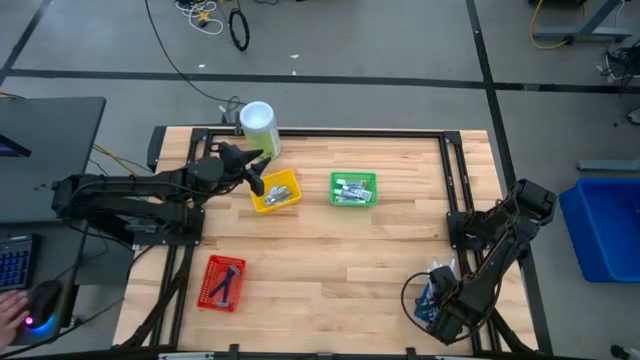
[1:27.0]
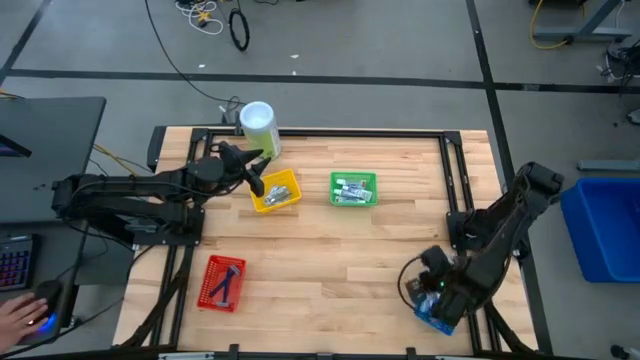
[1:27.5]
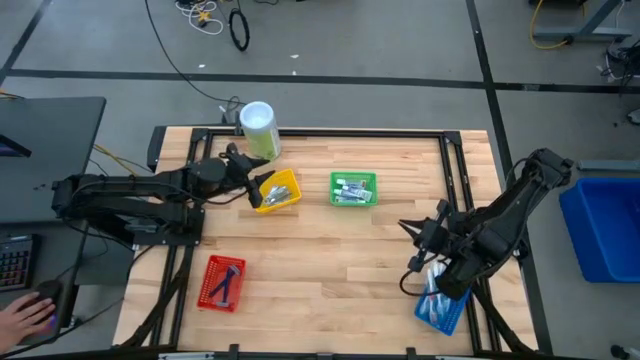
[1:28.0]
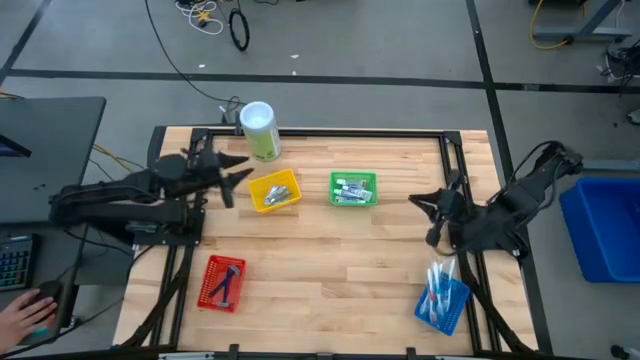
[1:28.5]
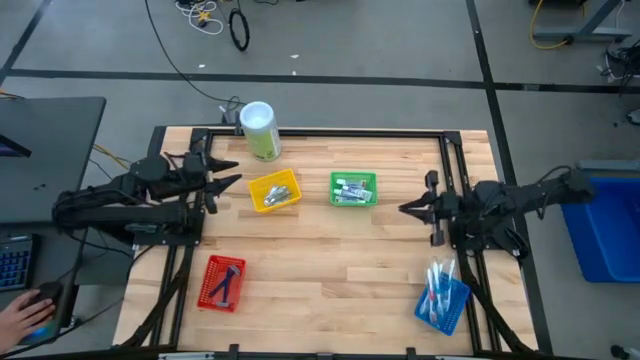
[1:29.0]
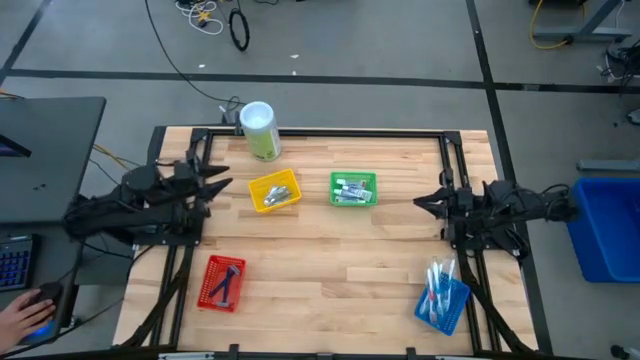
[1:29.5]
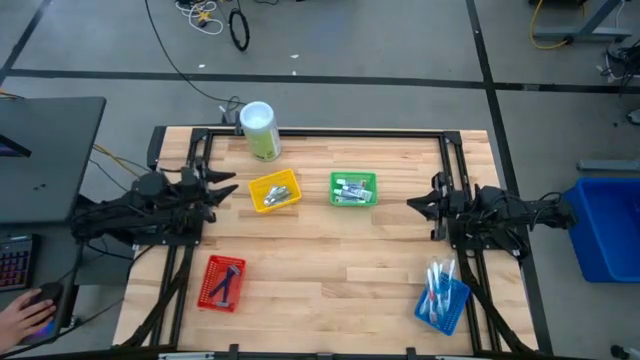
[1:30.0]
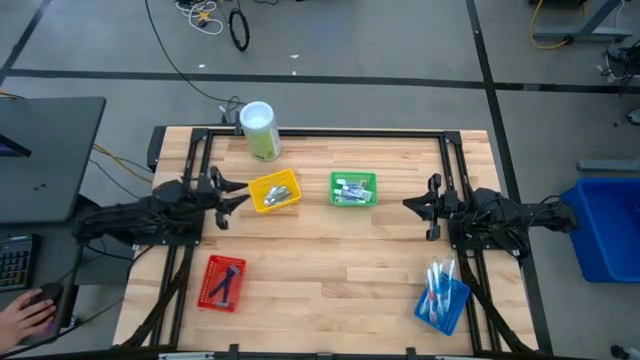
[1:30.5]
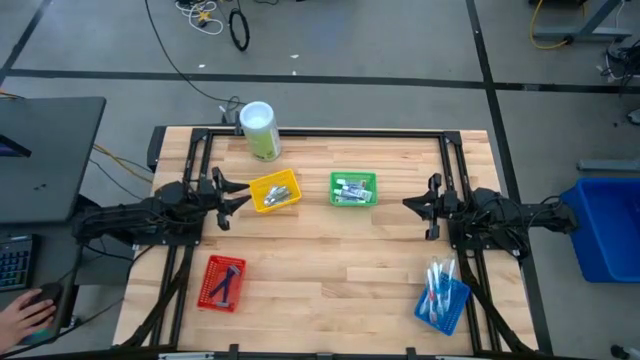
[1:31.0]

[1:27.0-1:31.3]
Task: Pick & Place Travel size toiletries
Return to Home Position

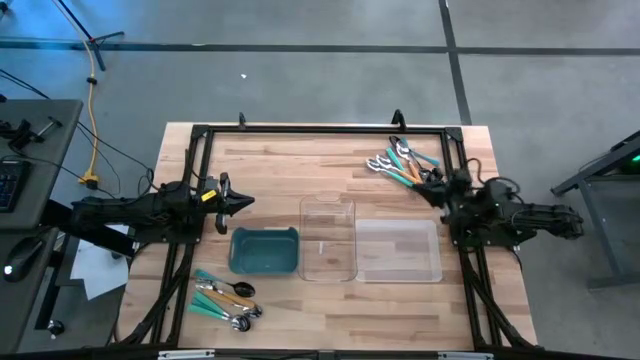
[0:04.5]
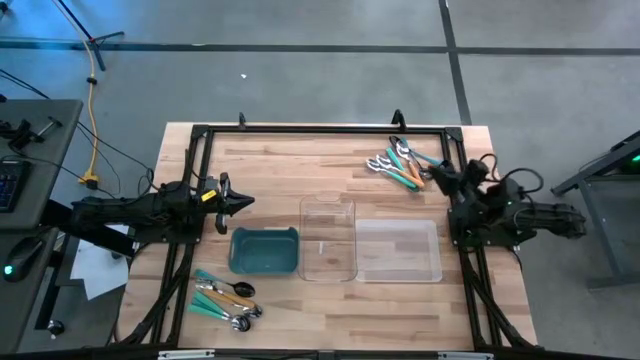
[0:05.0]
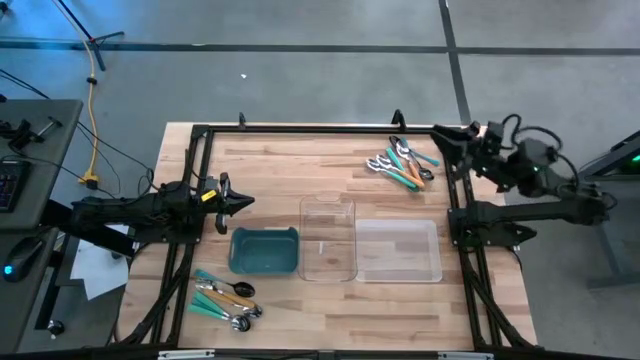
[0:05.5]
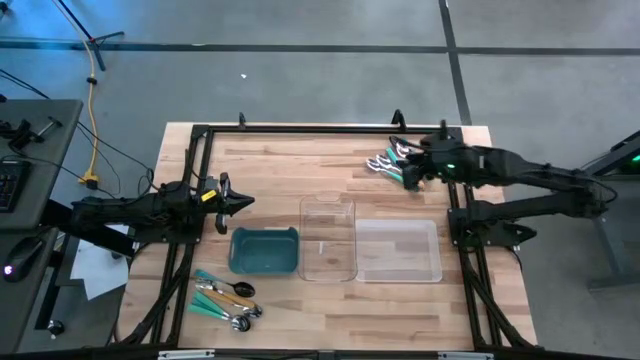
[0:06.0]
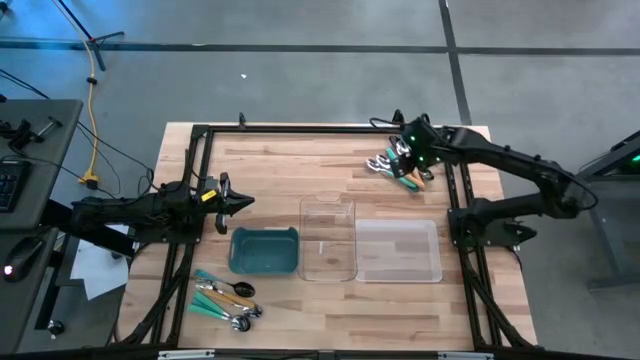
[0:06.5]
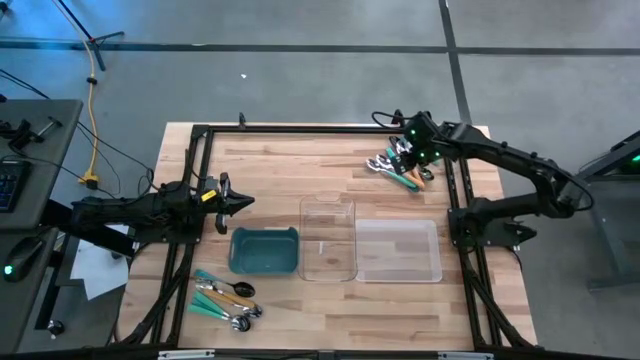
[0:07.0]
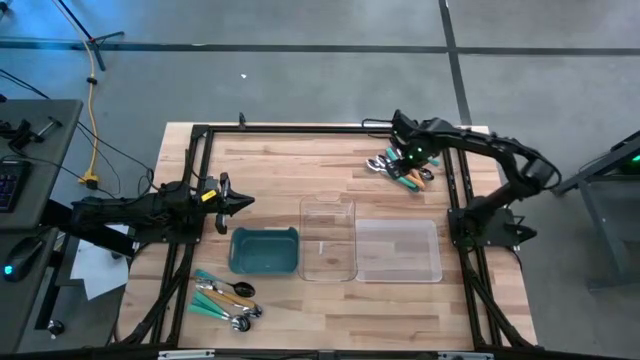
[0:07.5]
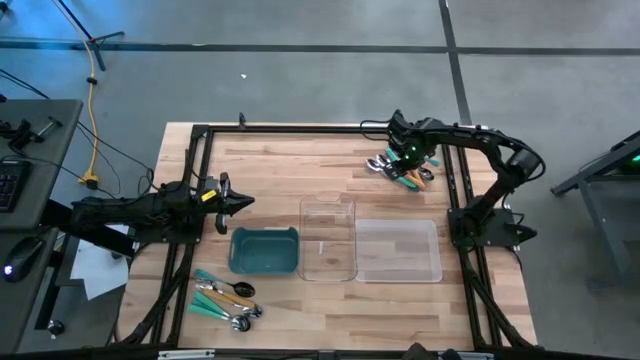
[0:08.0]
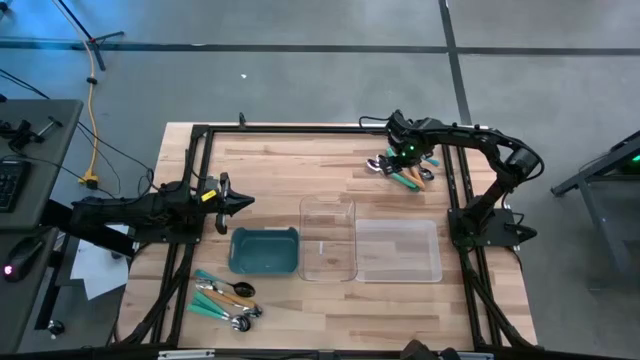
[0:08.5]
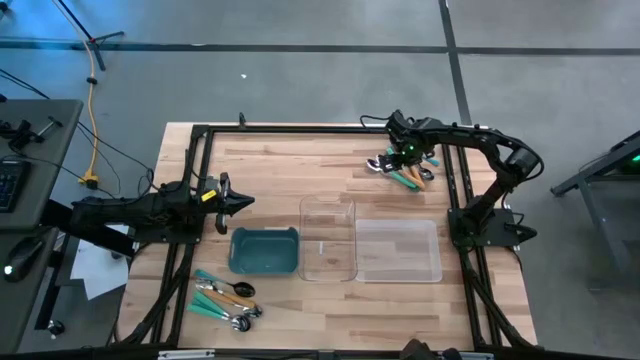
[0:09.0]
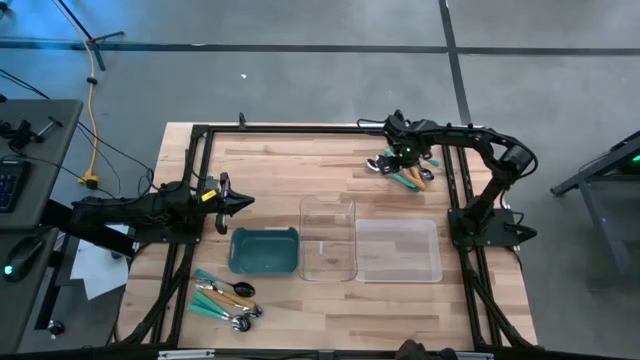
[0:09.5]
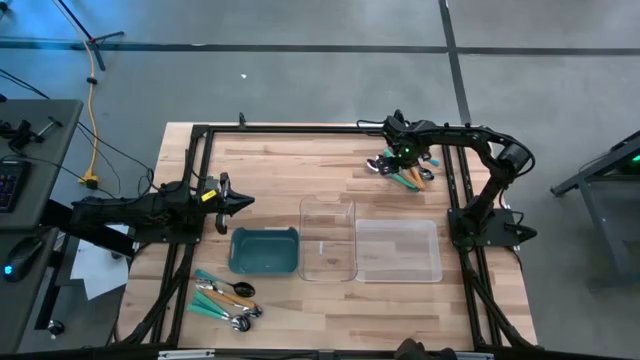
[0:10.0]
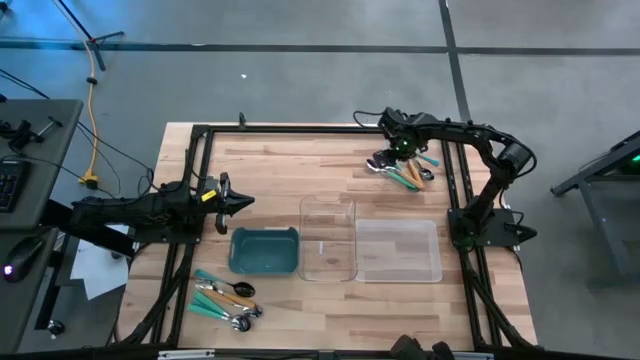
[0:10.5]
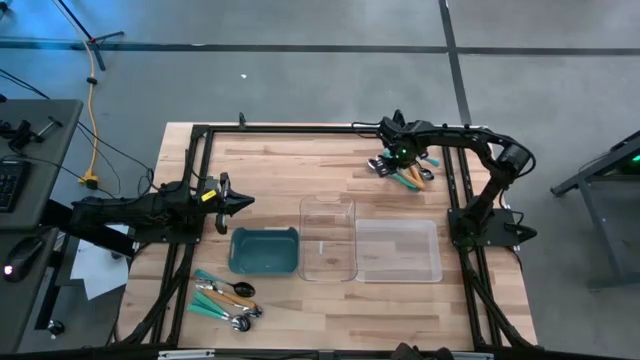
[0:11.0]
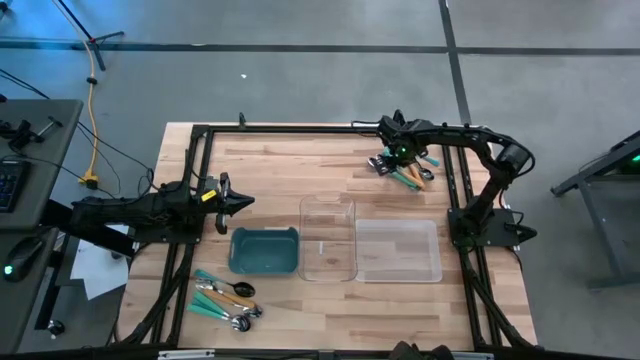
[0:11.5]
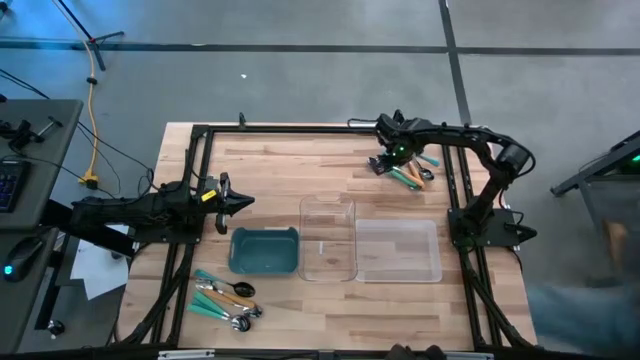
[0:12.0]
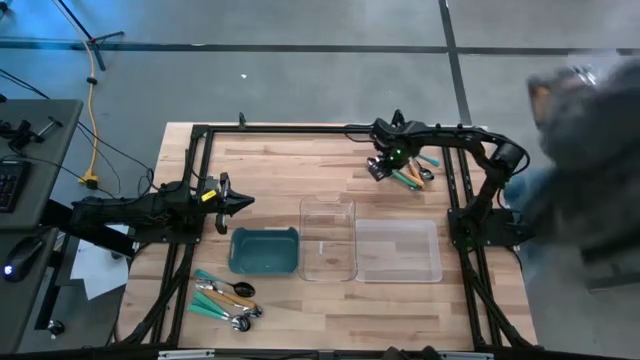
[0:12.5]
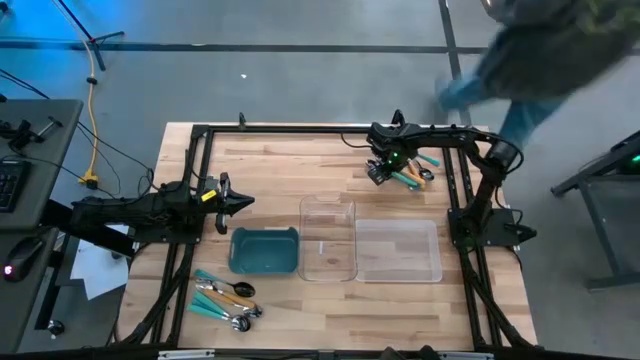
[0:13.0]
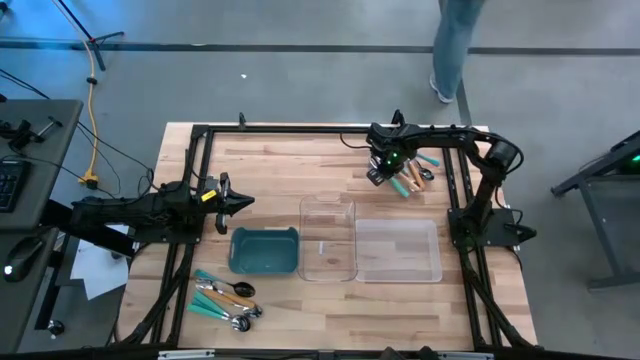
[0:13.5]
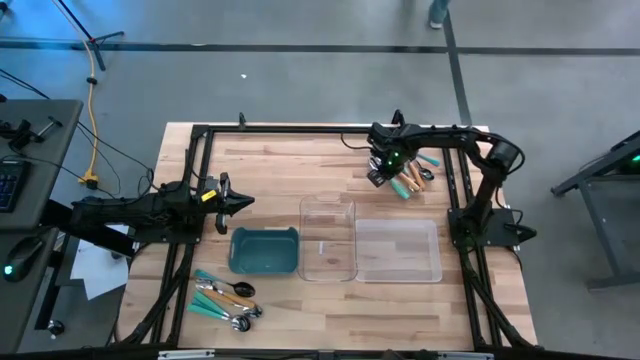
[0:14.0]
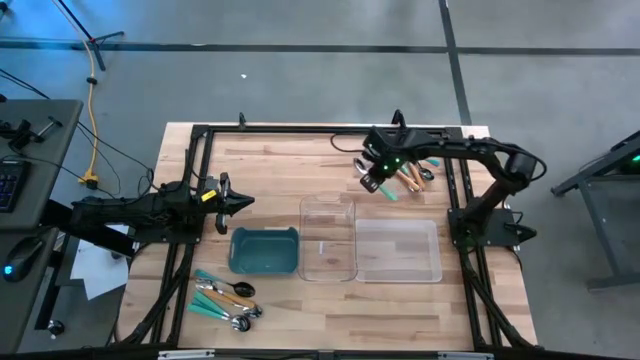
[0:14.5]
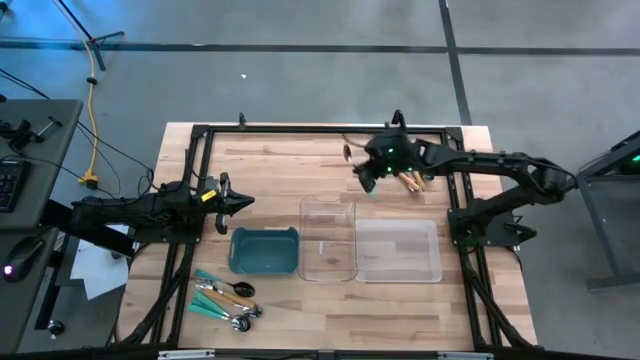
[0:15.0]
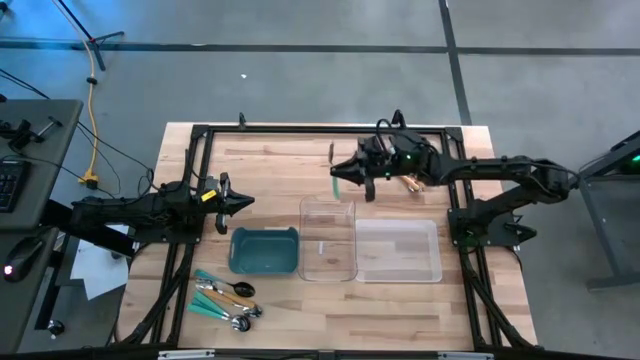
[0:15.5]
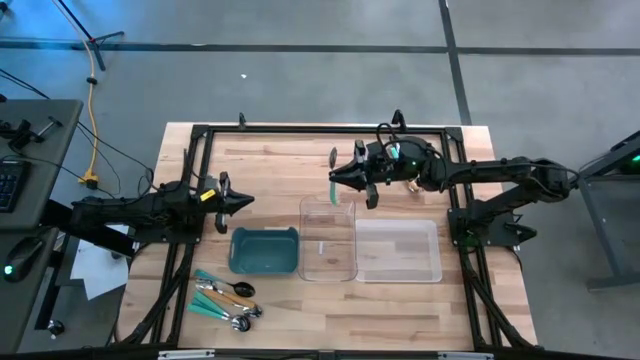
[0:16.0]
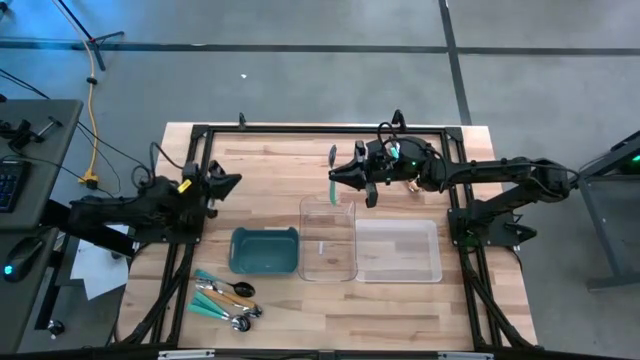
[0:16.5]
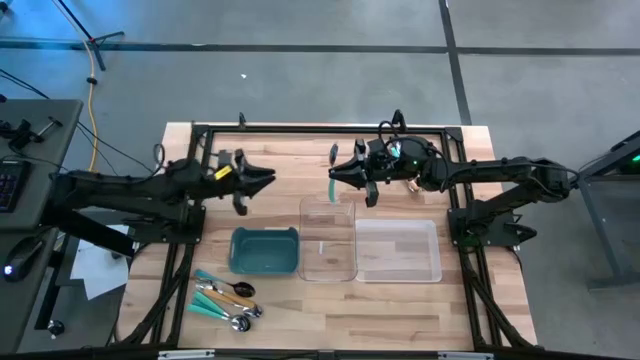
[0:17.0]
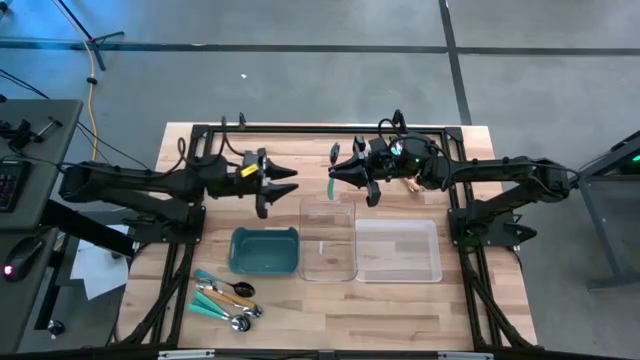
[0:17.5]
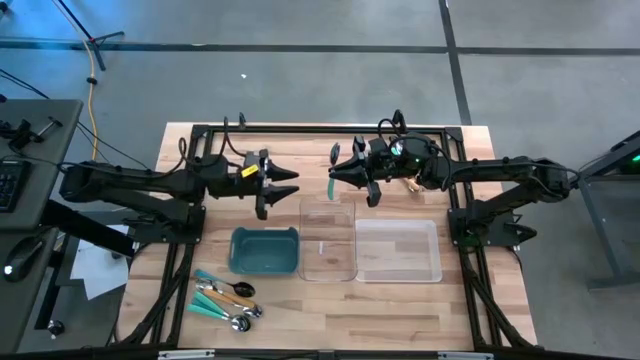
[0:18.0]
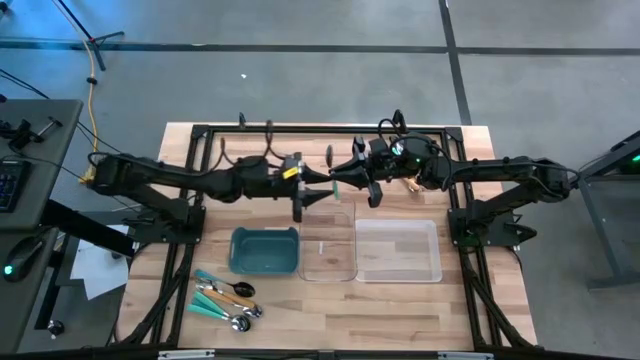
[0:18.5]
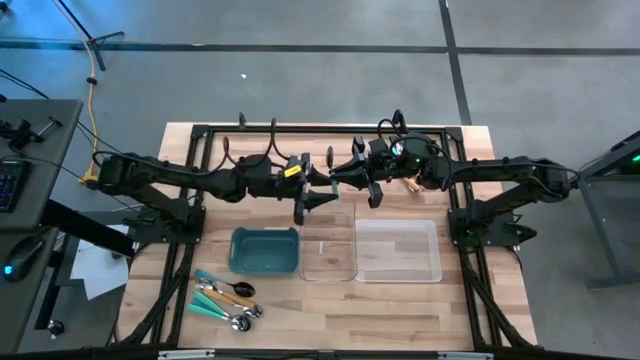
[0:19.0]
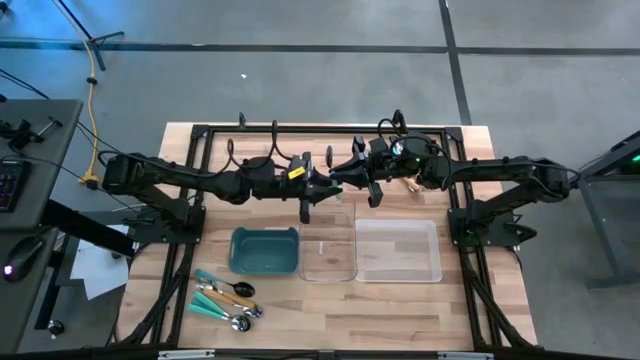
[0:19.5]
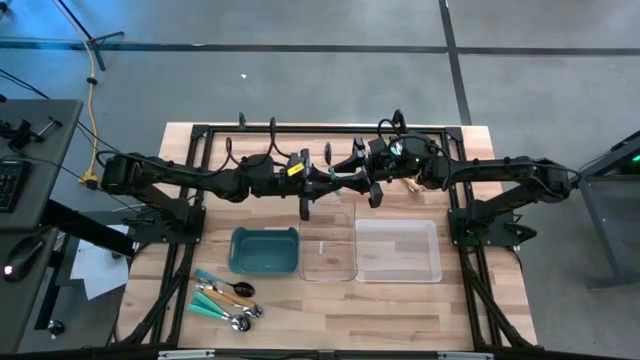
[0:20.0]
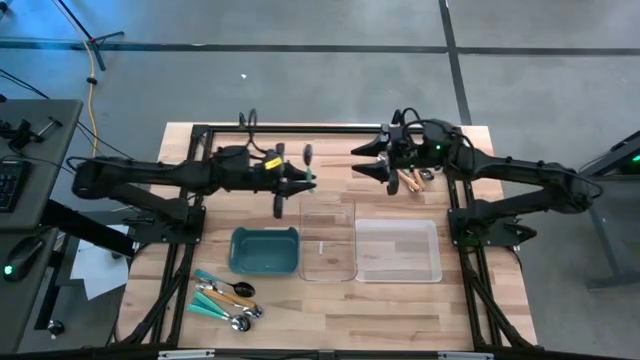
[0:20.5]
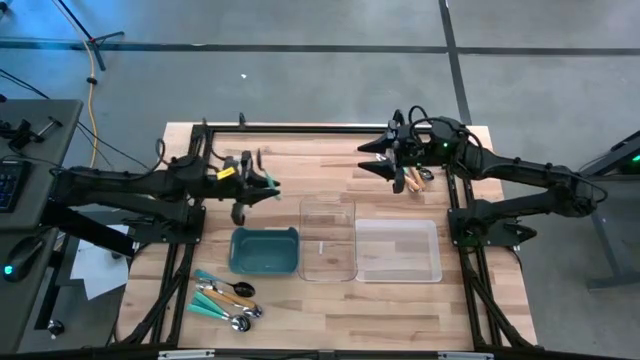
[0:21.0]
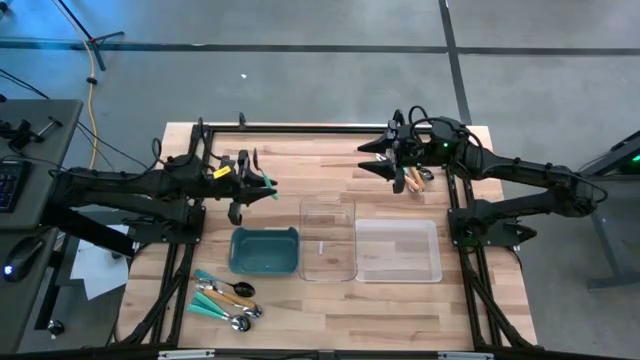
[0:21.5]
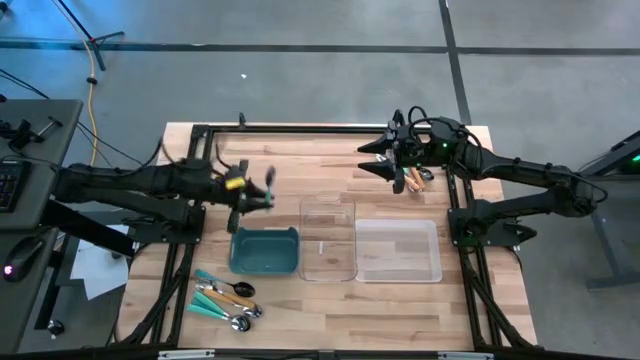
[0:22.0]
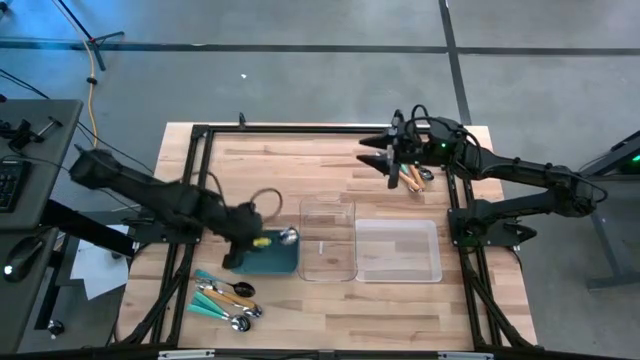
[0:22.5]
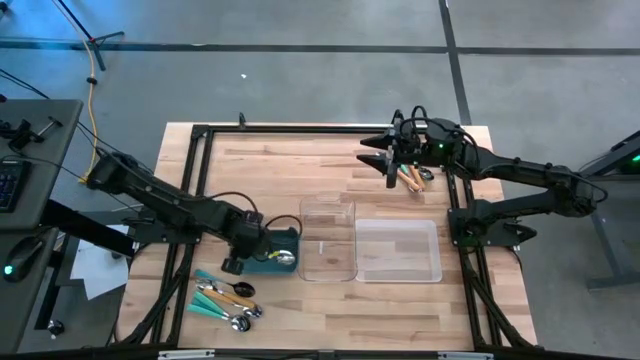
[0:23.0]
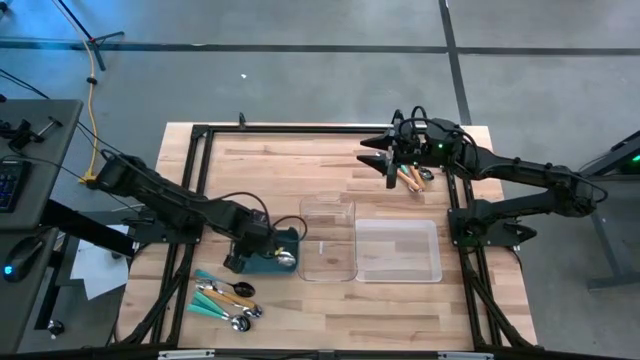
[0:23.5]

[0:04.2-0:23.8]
Task: Sort silverware by color (type)
Put the light blue spoon into the blue bin
